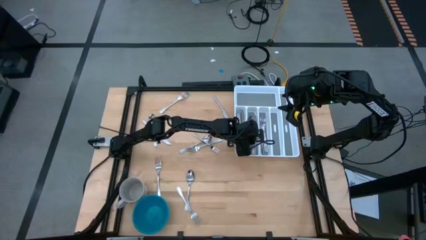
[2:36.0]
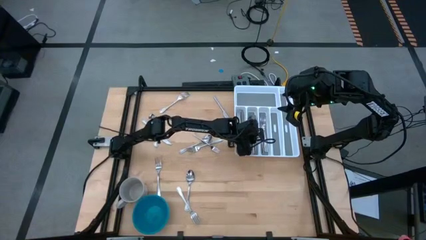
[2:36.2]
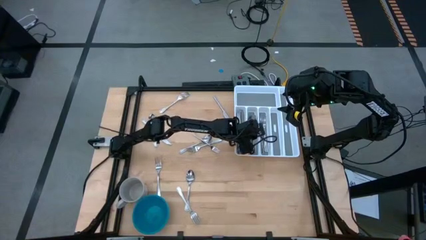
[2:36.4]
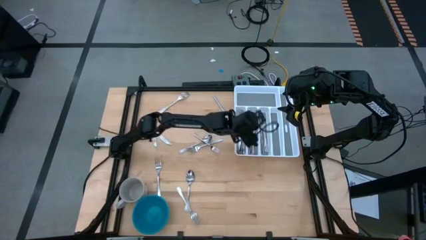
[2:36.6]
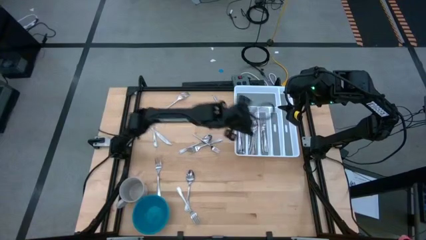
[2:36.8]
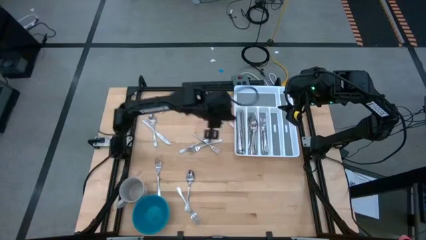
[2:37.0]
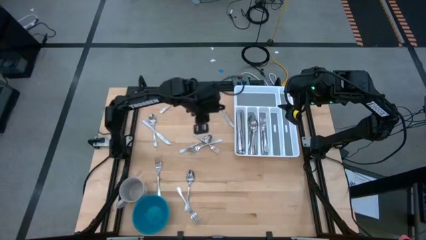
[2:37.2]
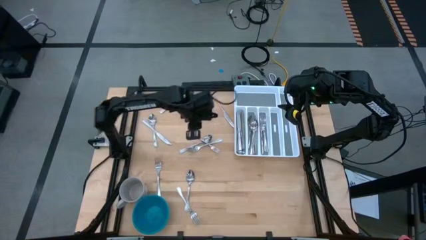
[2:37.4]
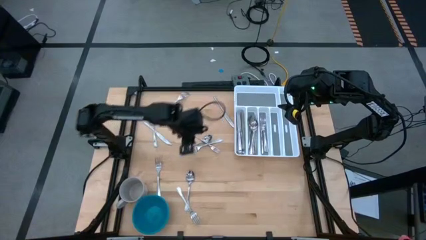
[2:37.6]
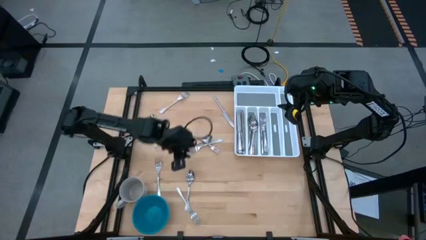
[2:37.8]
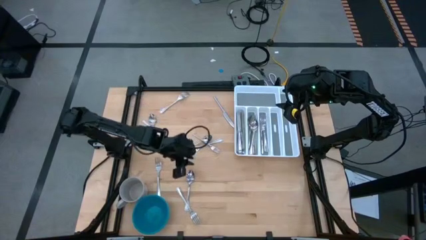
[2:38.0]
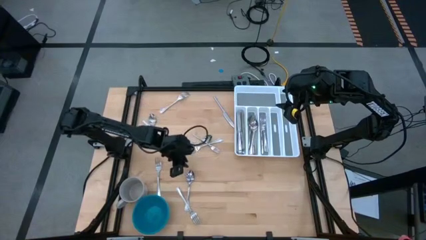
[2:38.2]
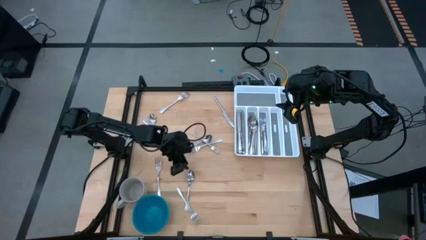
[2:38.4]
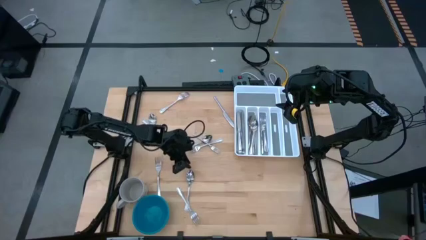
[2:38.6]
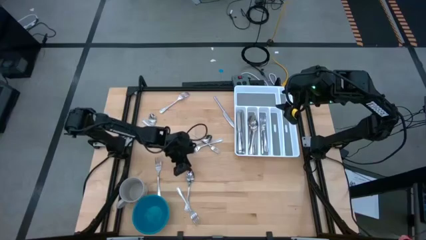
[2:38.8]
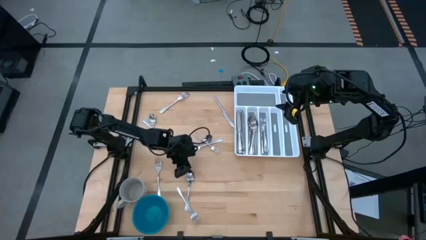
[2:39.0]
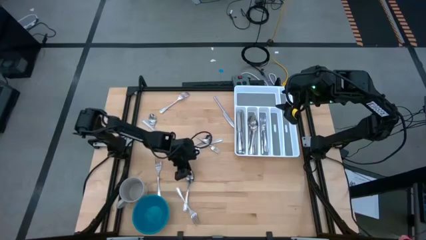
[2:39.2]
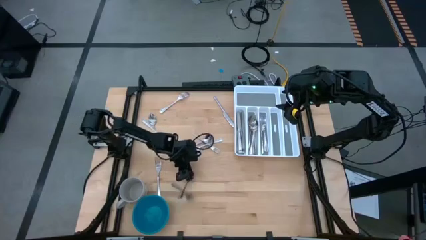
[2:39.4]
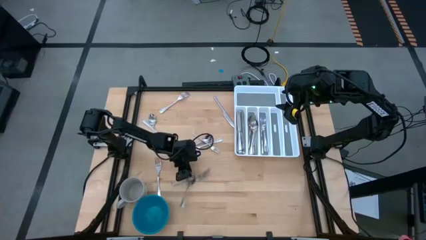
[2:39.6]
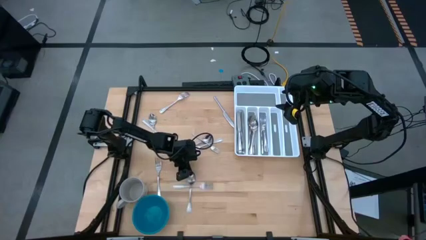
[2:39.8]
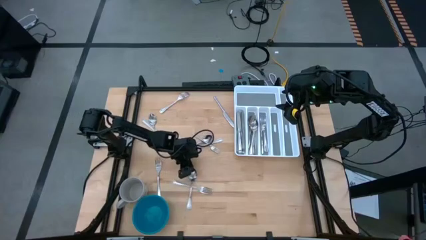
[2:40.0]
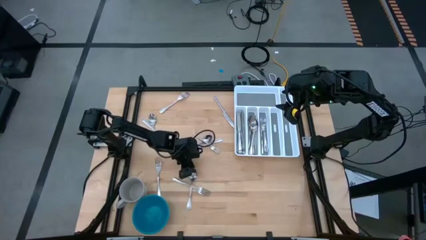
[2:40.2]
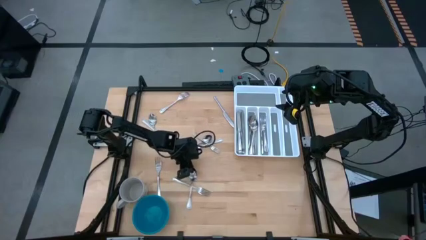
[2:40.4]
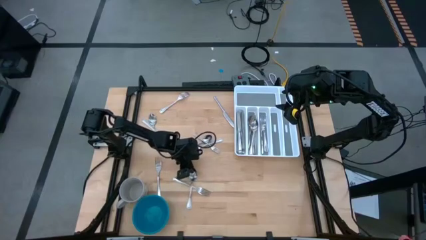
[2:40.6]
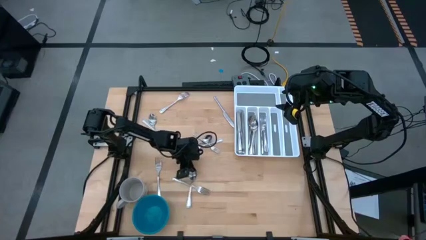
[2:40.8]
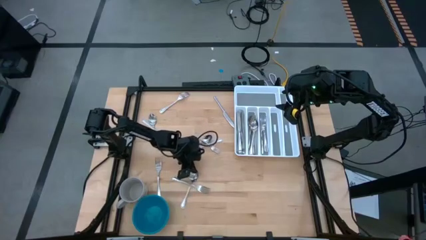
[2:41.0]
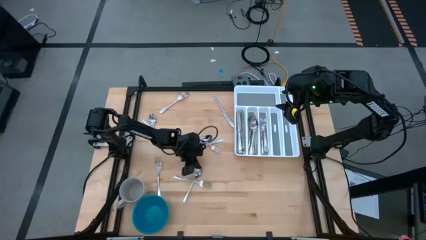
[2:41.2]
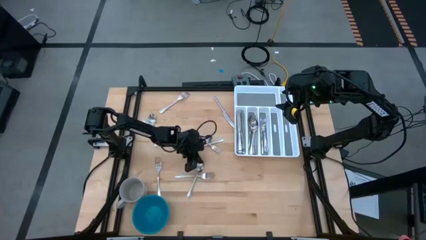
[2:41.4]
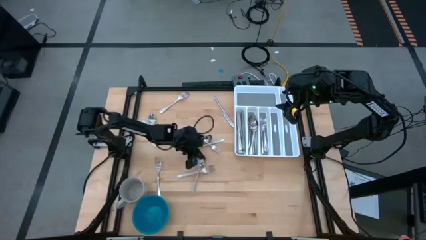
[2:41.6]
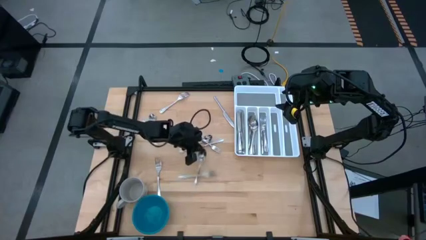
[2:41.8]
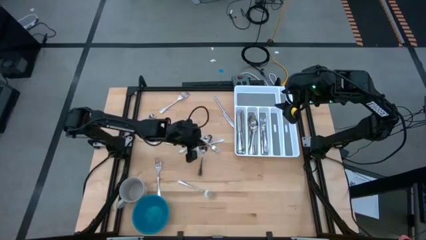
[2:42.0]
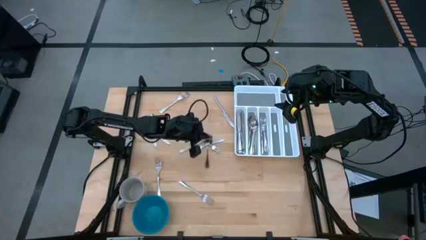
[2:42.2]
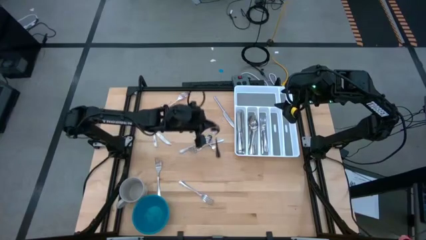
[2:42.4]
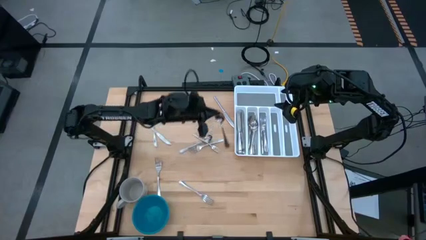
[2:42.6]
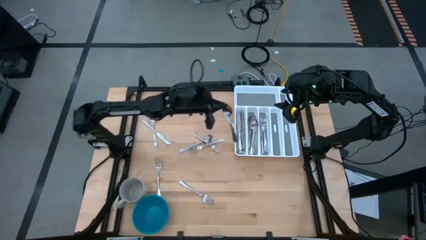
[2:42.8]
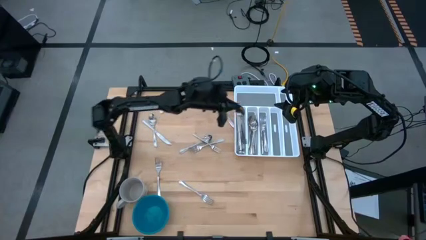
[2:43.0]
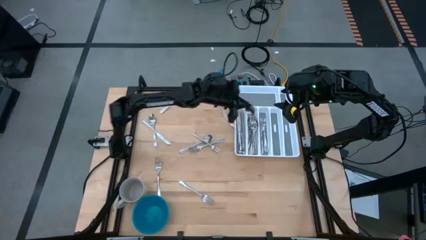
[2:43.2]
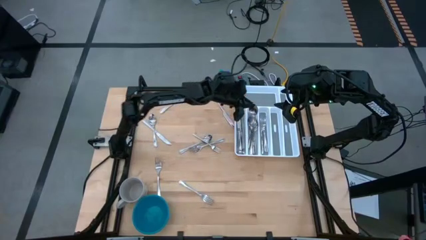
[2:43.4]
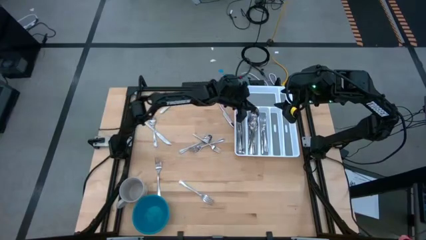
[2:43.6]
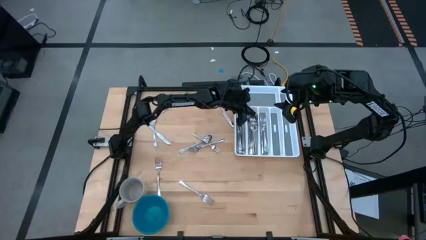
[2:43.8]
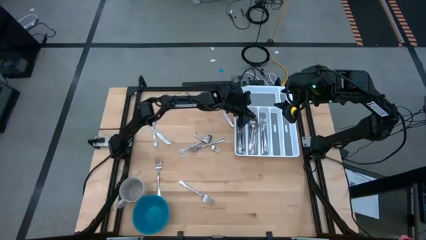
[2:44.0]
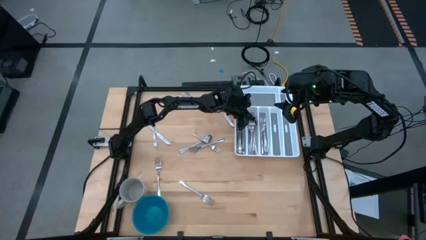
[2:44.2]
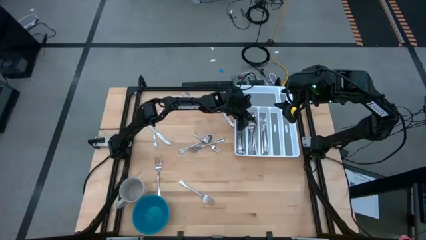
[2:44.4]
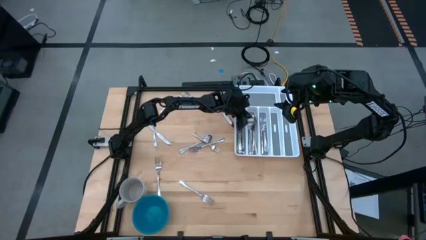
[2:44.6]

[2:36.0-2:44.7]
Task: Sort silverware
Put the spoon into the silverware tray

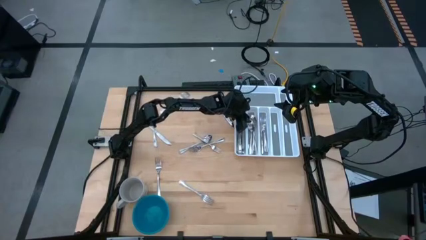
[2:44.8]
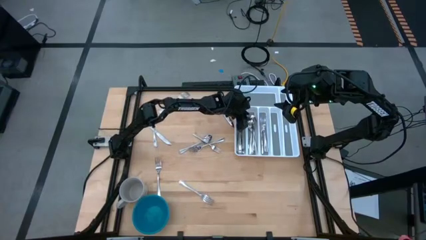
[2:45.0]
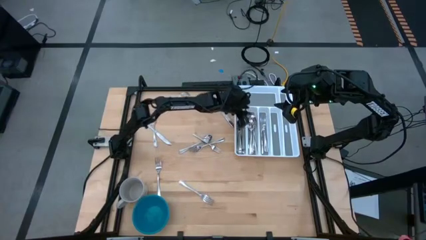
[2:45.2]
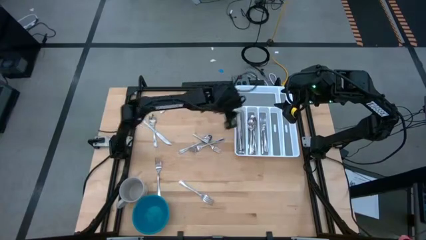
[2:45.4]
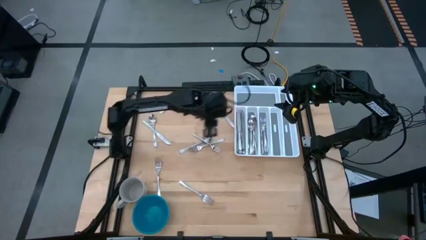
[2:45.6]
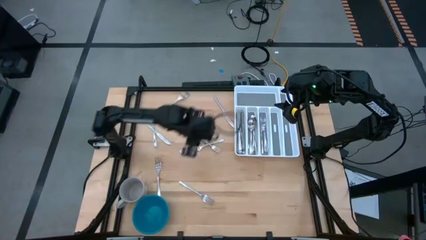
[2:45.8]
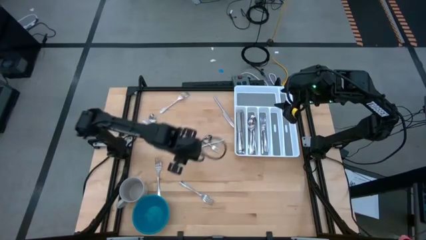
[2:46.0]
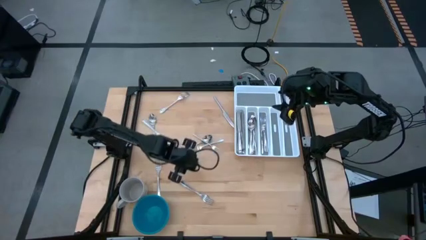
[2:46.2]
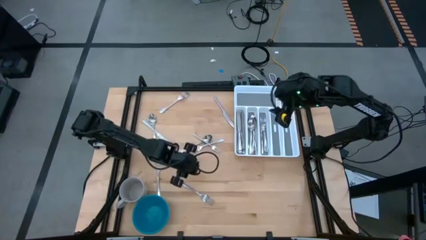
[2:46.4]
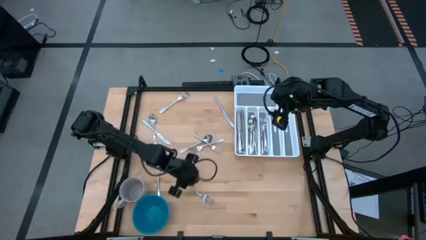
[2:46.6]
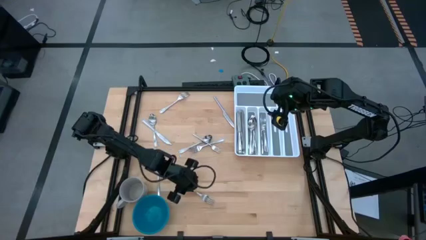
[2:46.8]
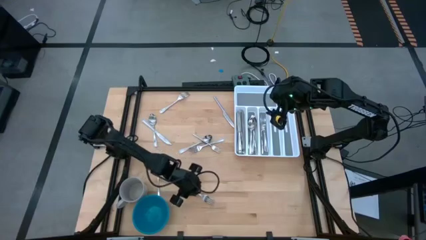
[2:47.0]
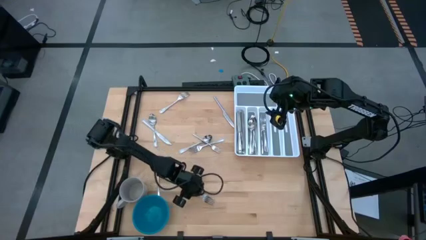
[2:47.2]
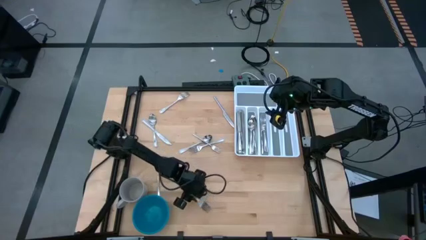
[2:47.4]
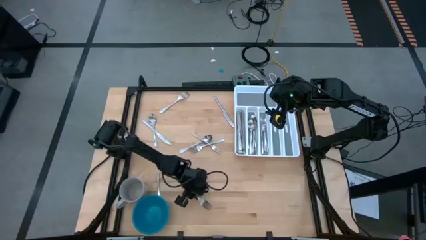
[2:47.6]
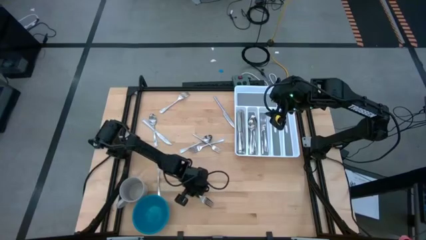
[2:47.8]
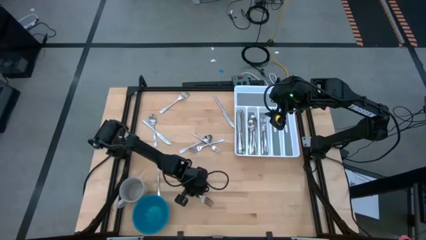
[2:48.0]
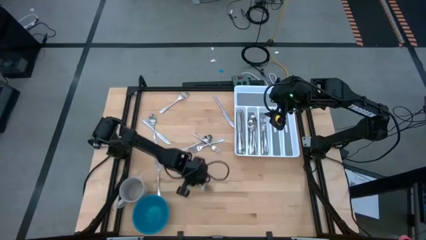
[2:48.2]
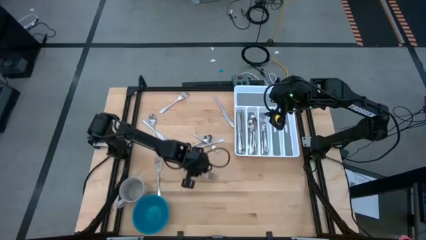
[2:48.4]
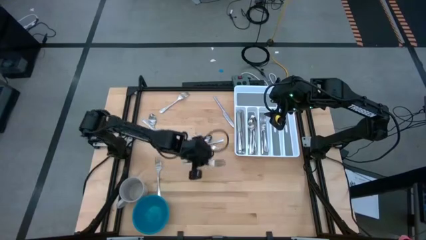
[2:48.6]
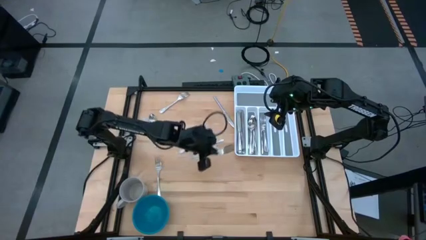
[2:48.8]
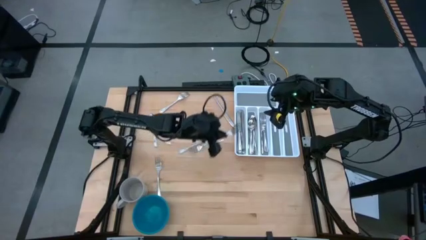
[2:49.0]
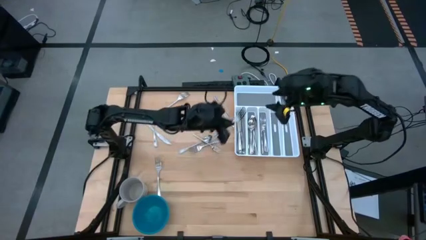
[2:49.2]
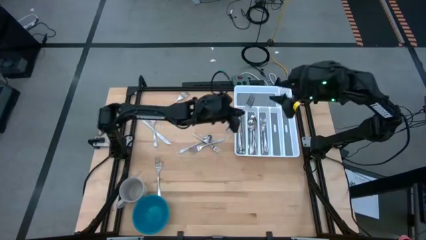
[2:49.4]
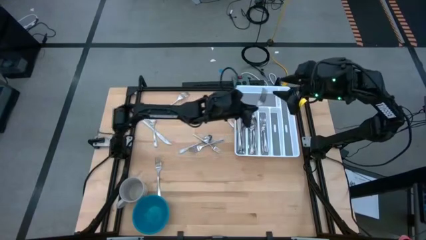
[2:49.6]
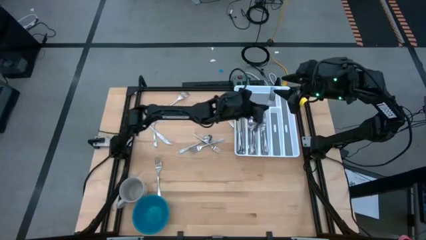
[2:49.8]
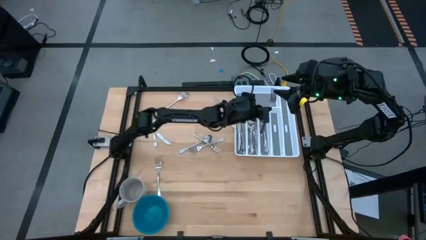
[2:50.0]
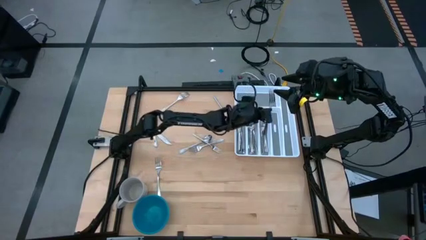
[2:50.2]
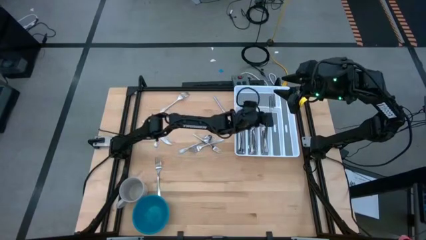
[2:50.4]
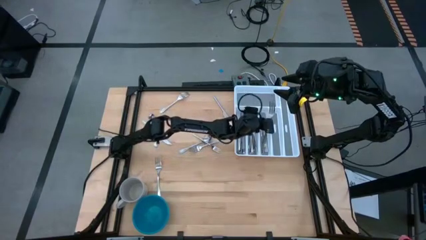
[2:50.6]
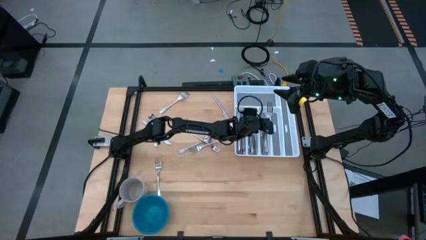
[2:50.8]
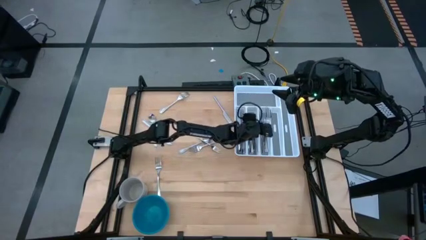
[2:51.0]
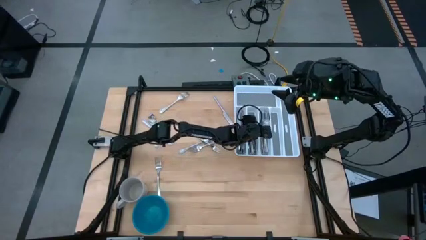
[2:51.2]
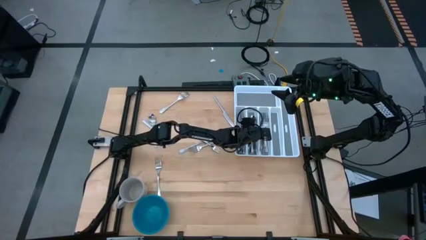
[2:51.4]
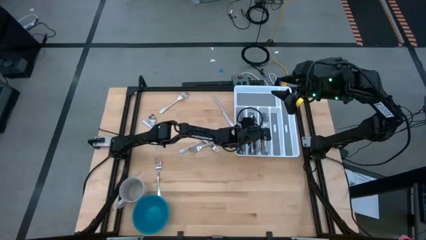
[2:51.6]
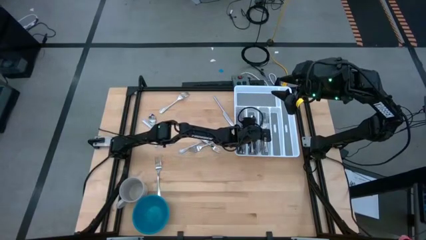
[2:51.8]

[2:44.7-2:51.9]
Put the fork into the silverware tray
